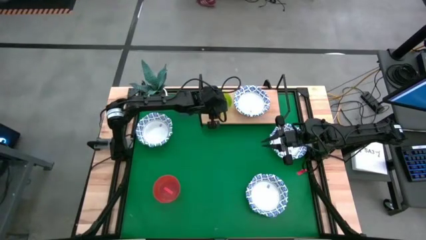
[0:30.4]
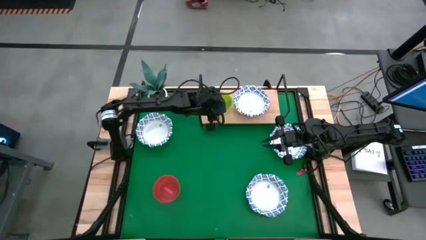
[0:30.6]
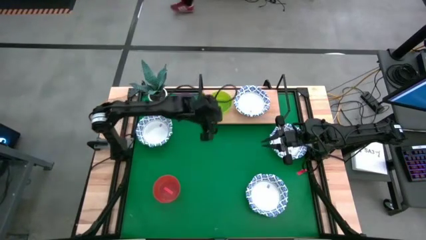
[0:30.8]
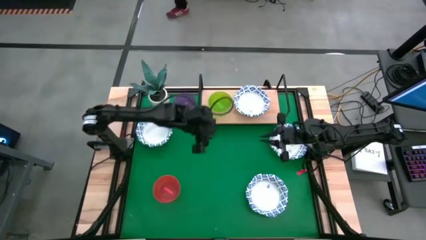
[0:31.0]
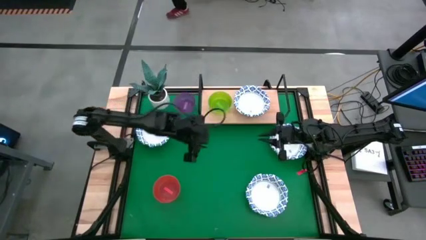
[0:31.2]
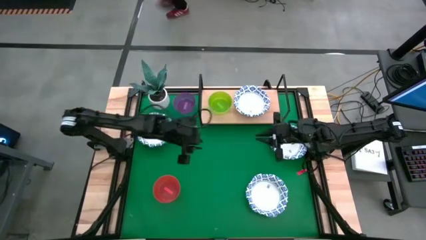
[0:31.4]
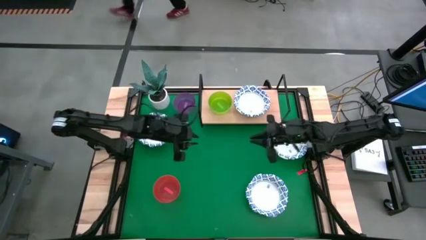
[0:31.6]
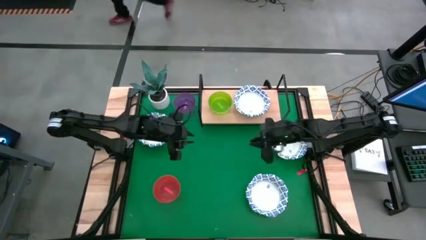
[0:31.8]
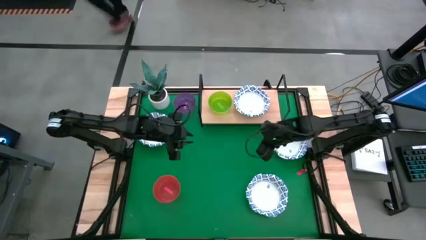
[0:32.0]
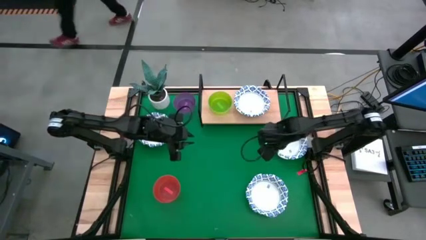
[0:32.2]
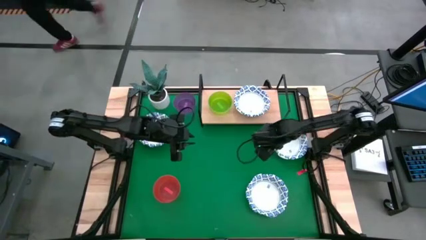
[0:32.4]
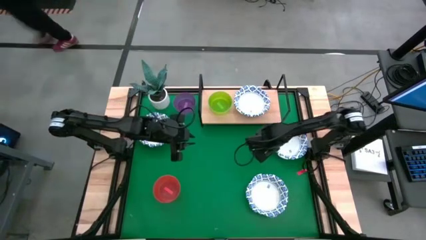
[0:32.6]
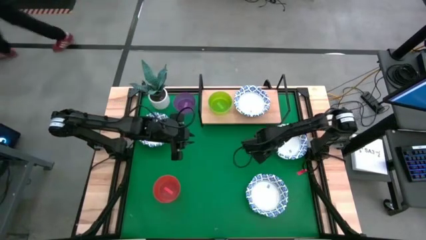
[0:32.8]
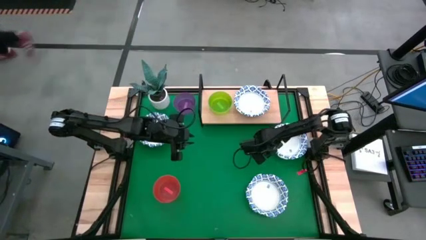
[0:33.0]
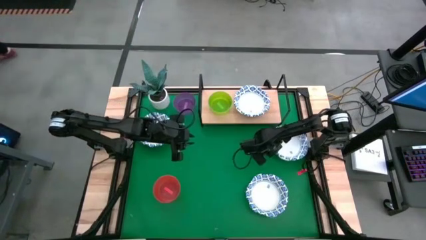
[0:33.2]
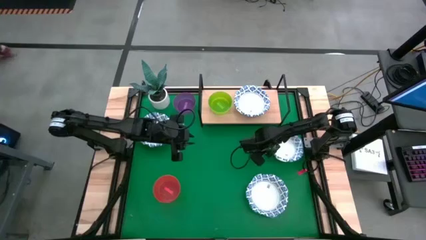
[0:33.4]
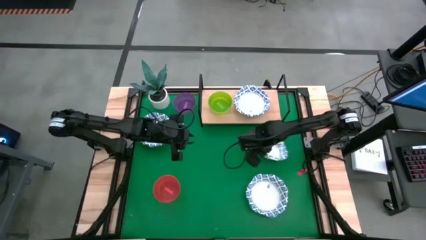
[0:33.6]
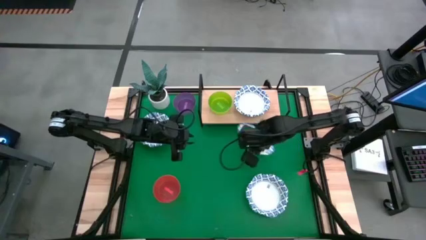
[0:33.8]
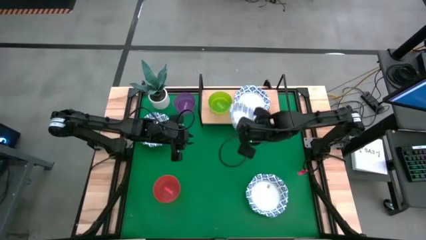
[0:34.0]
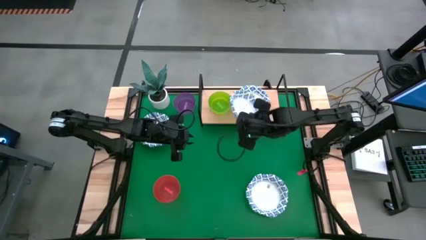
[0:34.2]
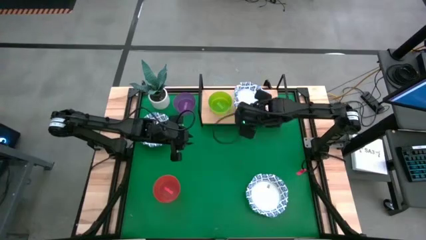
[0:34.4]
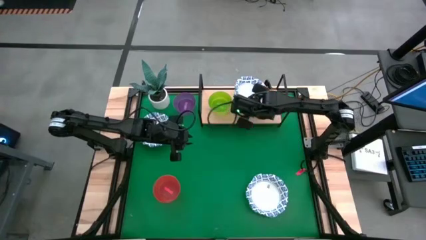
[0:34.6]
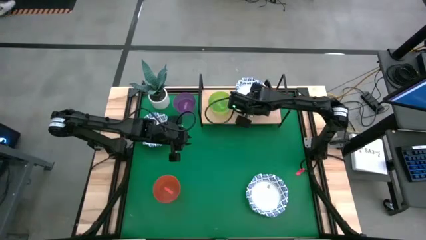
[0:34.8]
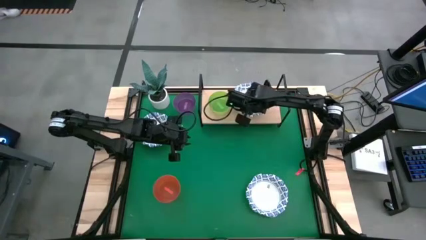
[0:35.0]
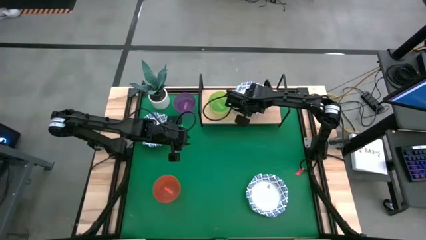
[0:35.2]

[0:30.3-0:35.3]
Task: Place and stack bowls onto a shelf
Stack the top right white bowl into the white bowl on the shelf

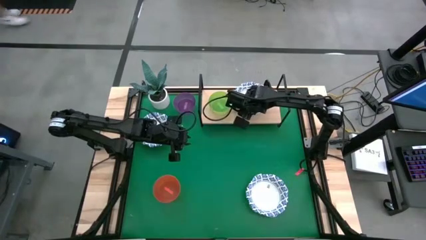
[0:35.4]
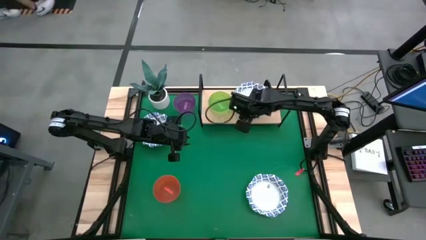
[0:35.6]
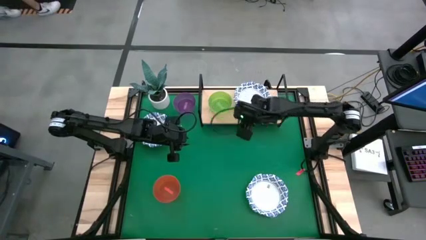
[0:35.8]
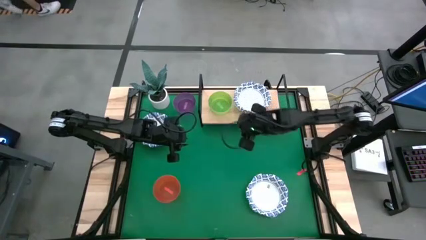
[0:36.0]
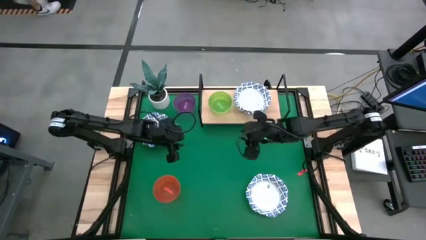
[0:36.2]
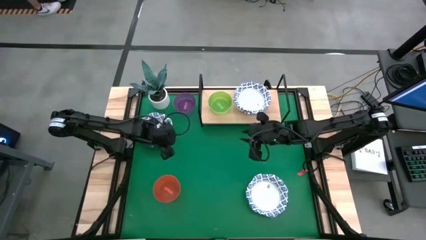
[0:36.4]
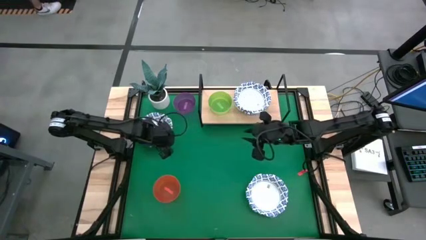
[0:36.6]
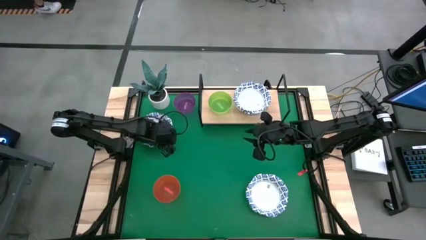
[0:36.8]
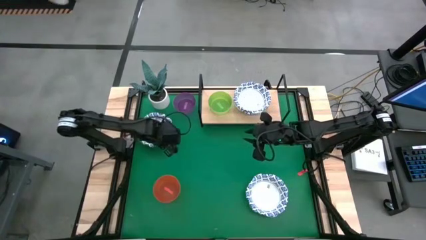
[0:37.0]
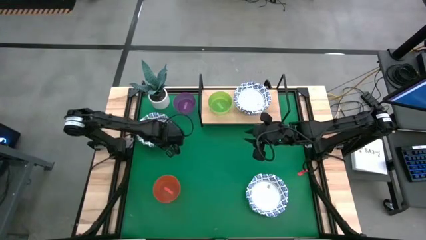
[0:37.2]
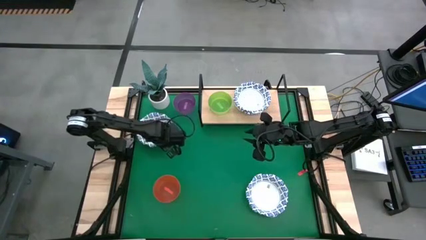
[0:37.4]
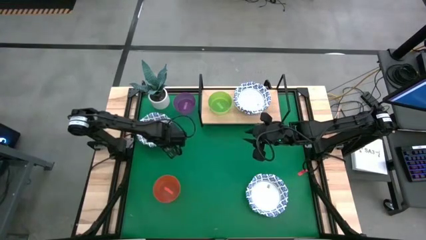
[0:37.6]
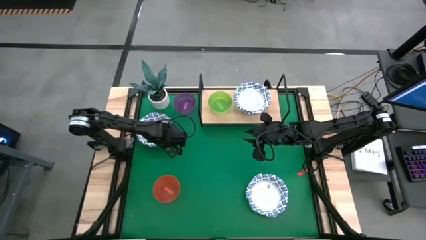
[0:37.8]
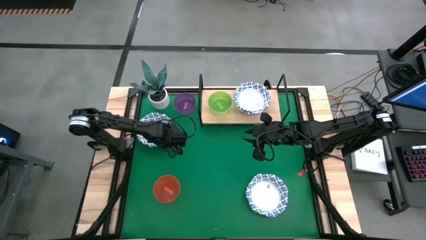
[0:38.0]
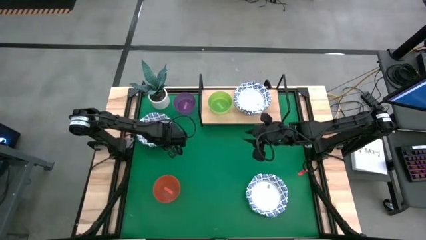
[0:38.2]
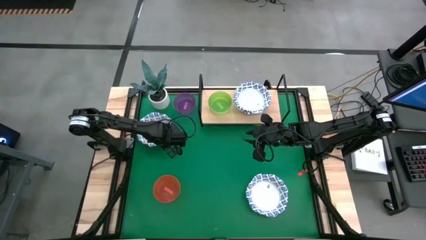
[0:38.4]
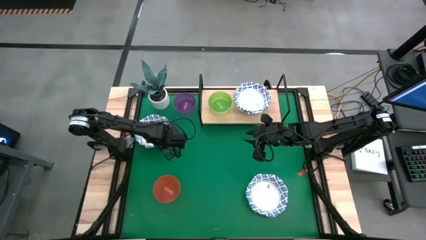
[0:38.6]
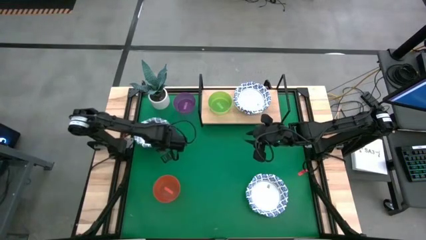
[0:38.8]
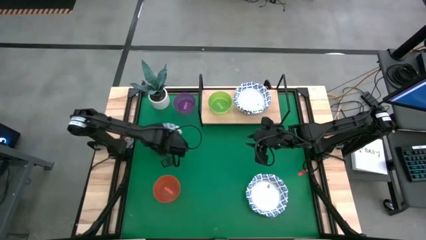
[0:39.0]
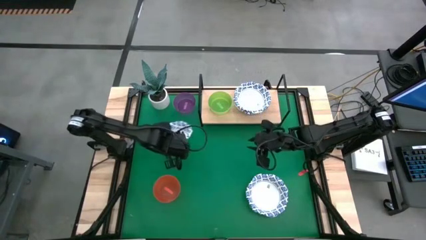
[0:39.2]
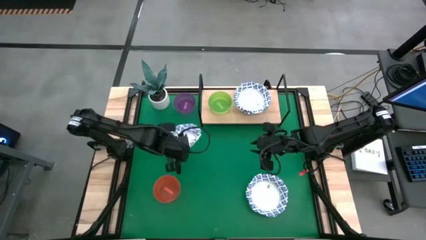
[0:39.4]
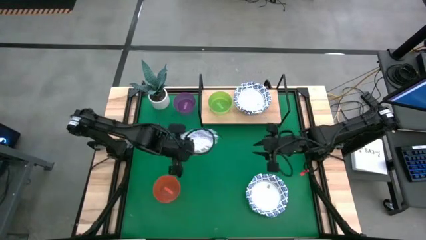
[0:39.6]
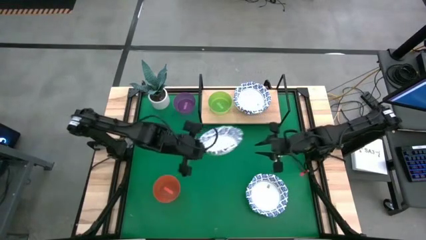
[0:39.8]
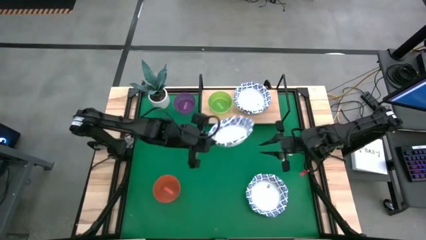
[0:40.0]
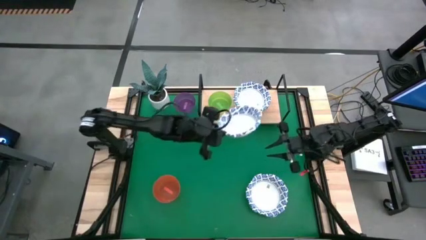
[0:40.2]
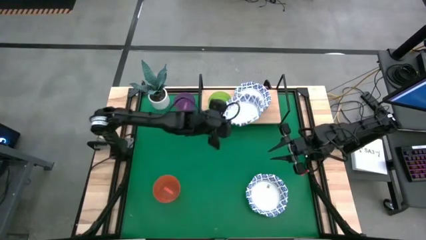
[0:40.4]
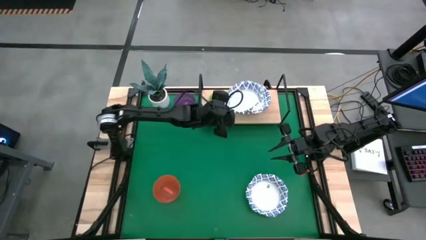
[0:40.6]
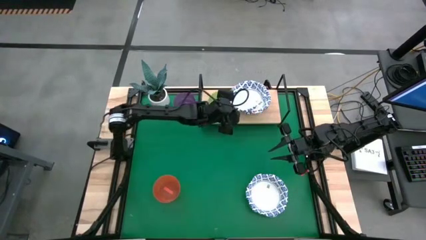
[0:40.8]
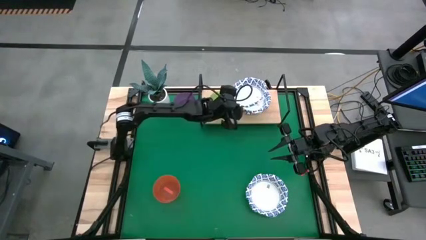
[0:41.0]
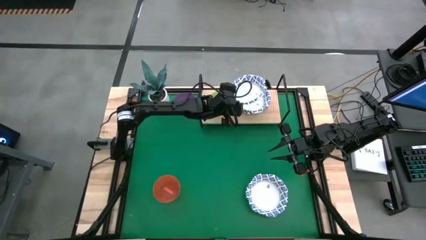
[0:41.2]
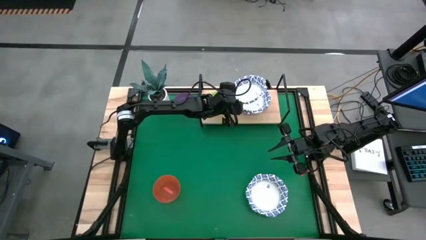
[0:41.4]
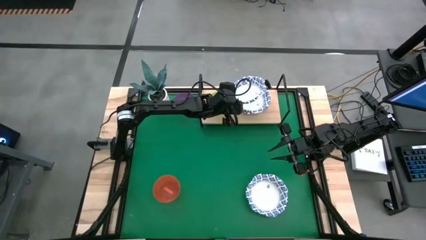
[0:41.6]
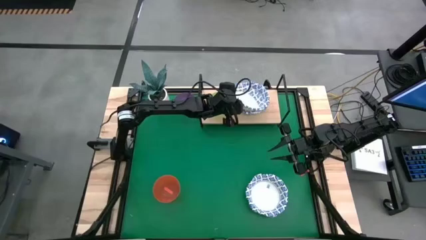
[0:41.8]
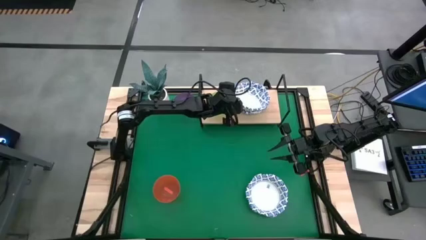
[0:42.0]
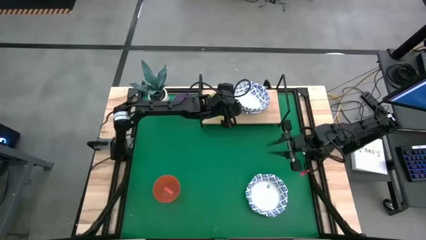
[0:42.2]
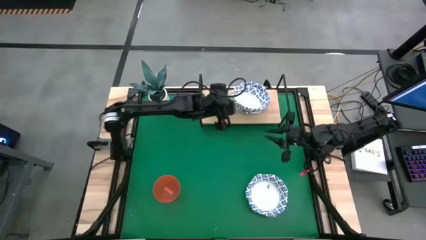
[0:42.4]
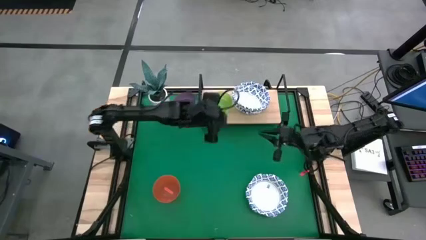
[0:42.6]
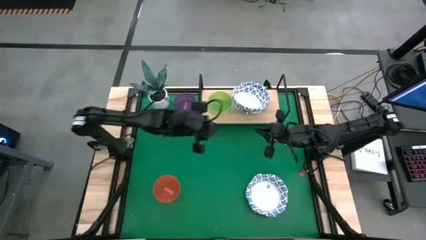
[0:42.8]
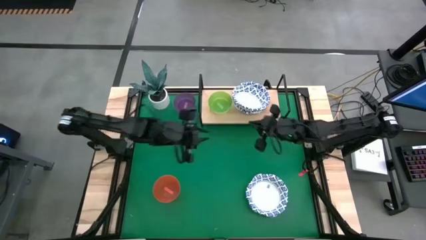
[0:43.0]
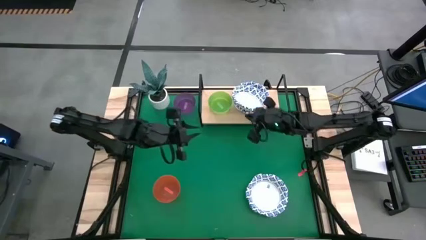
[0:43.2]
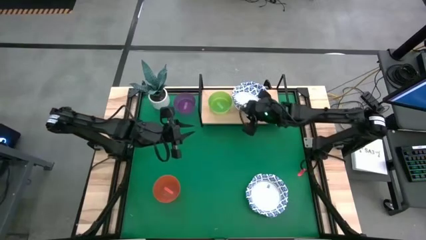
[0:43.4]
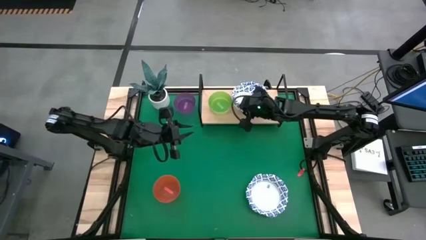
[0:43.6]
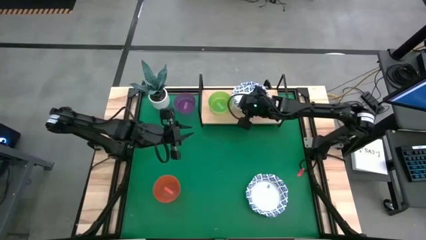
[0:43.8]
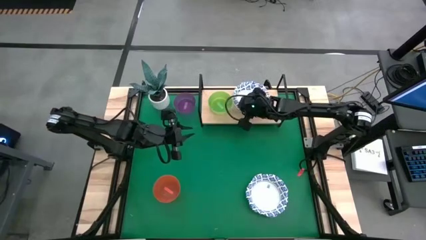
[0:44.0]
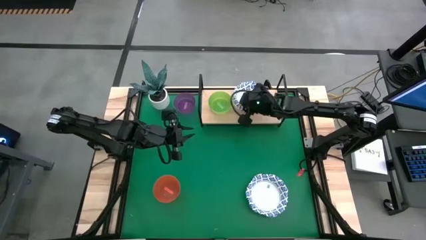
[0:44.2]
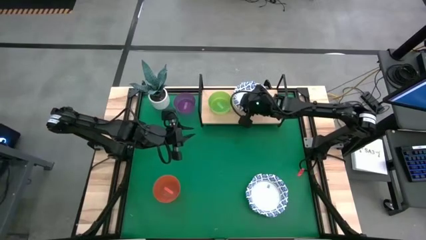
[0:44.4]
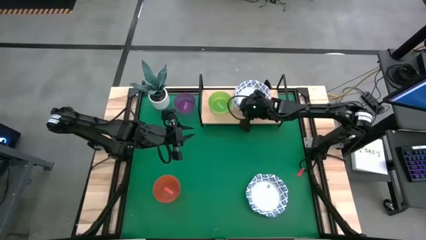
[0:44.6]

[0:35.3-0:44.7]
Stack the left white bowl into the white bowl on the shelf

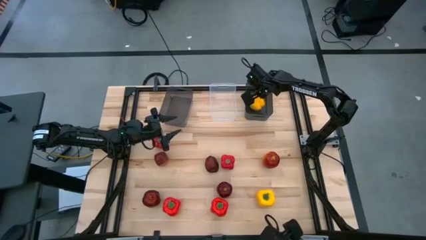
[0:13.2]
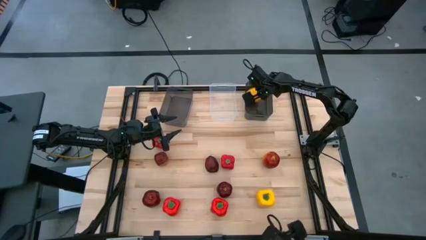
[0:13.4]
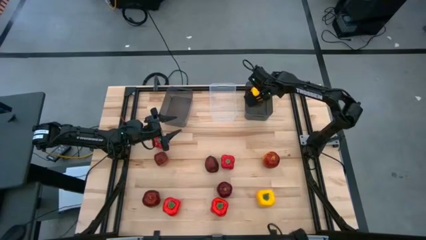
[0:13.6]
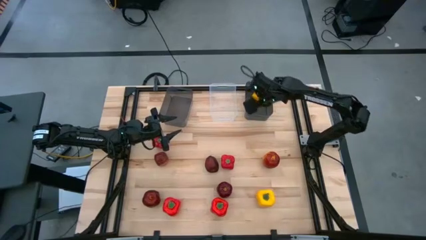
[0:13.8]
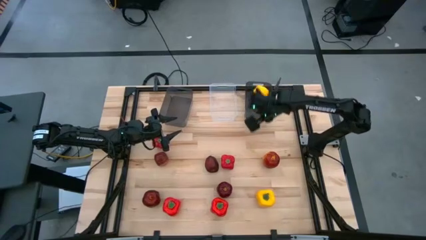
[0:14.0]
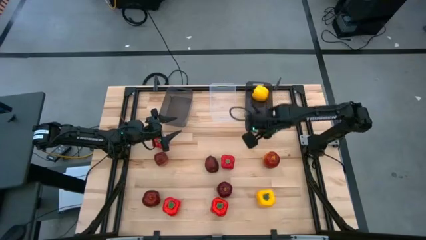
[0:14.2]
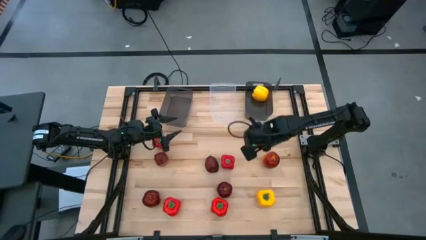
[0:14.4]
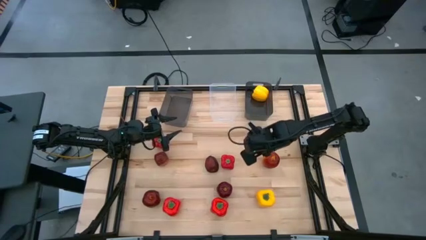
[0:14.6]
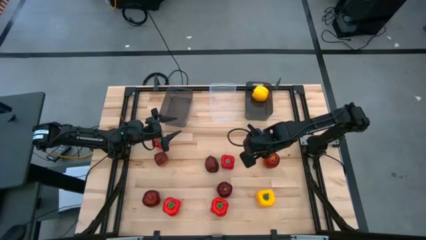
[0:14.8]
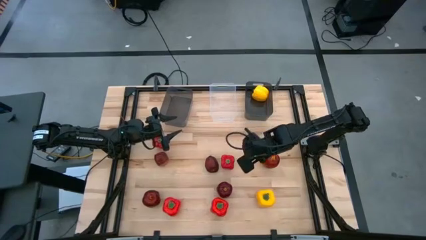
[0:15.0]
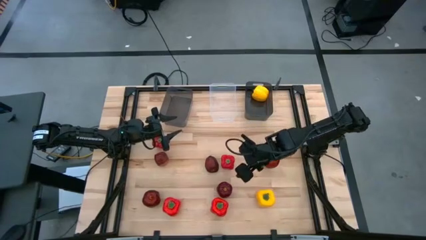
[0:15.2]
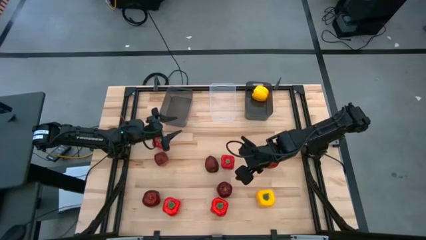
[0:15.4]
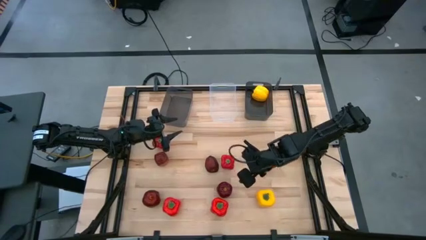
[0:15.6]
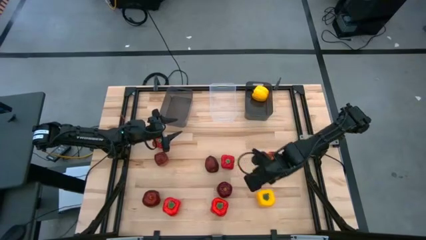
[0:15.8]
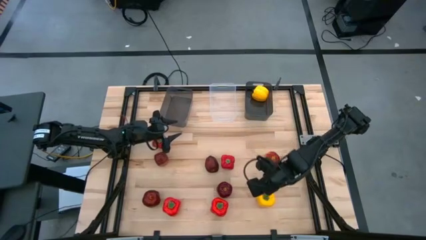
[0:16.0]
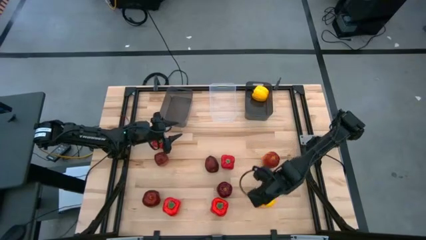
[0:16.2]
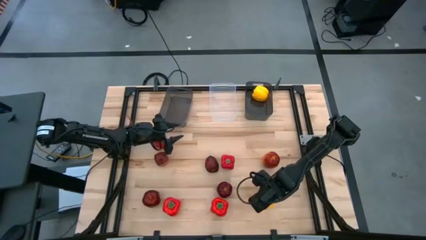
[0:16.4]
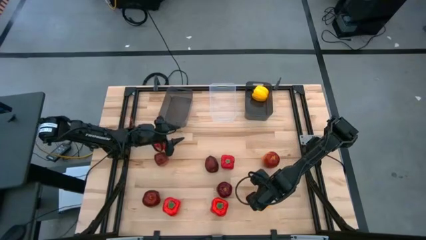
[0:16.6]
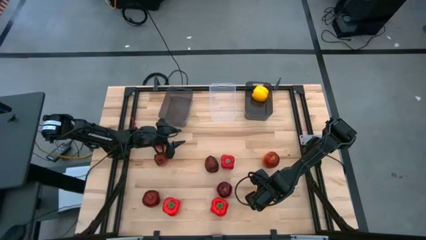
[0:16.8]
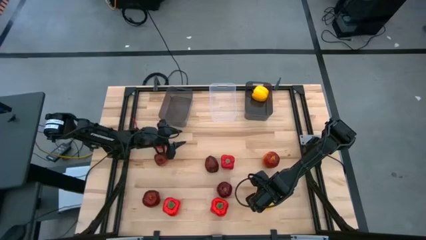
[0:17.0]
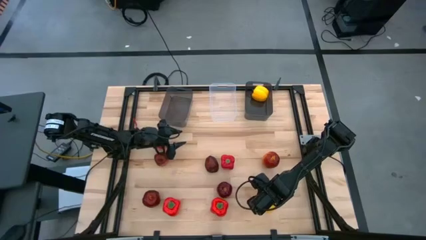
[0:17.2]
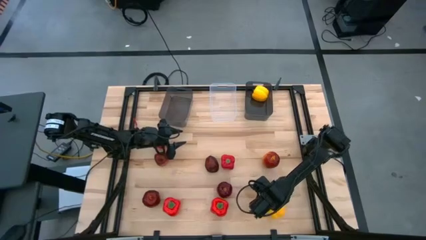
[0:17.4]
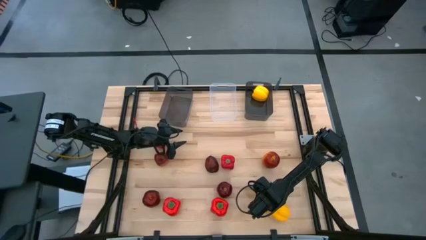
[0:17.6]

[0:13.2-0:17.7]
Task: Sort produce into baskets
Put the yellow bell pepper into the right black bin
